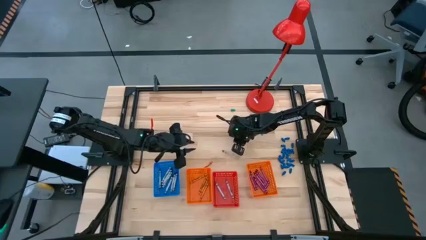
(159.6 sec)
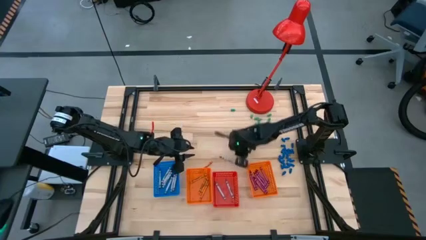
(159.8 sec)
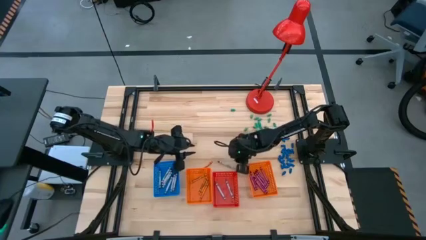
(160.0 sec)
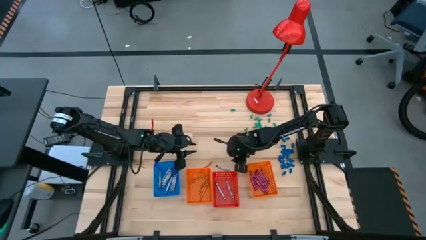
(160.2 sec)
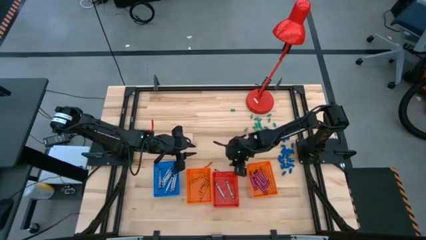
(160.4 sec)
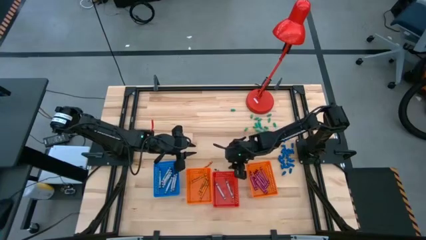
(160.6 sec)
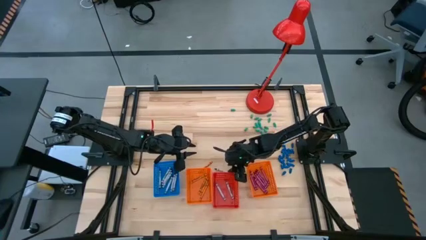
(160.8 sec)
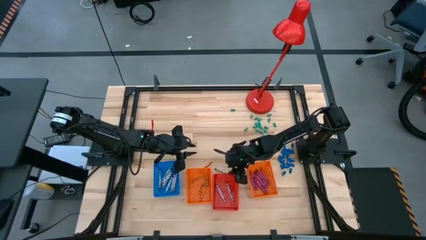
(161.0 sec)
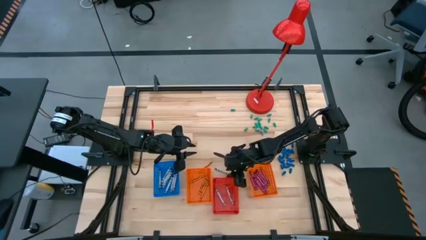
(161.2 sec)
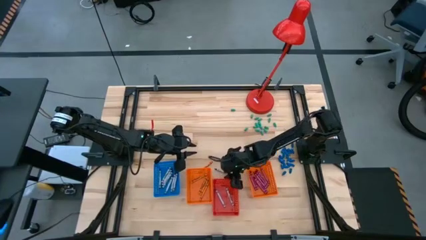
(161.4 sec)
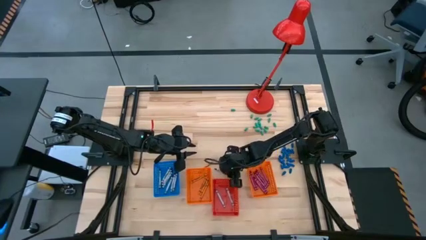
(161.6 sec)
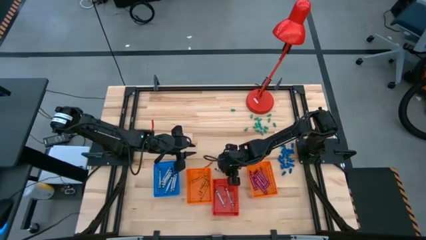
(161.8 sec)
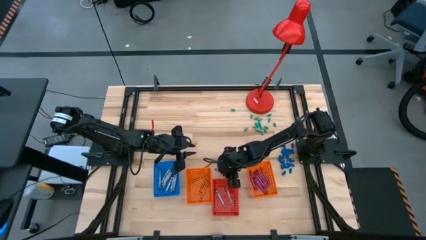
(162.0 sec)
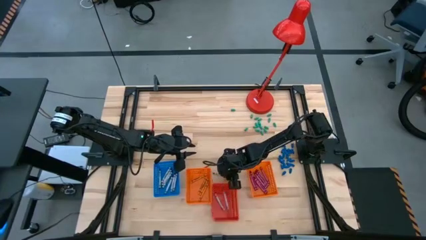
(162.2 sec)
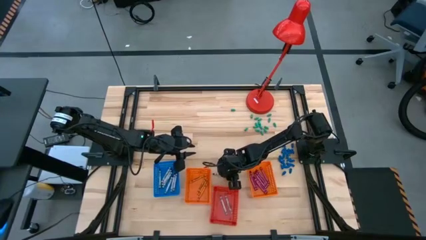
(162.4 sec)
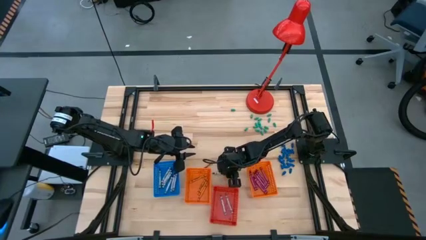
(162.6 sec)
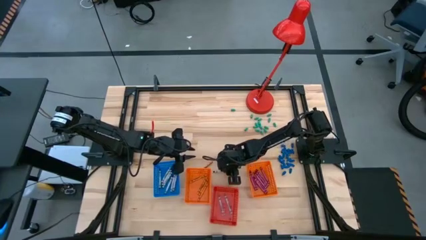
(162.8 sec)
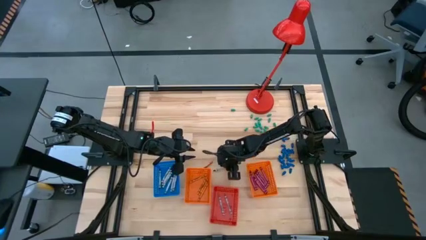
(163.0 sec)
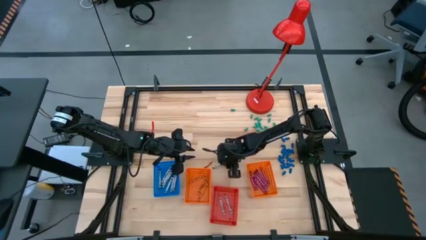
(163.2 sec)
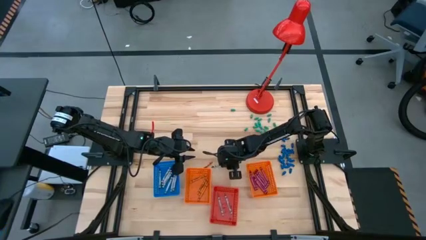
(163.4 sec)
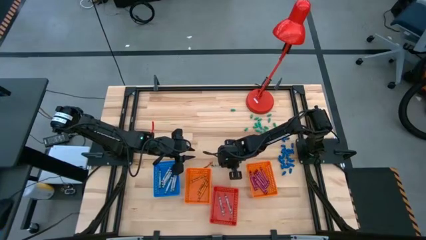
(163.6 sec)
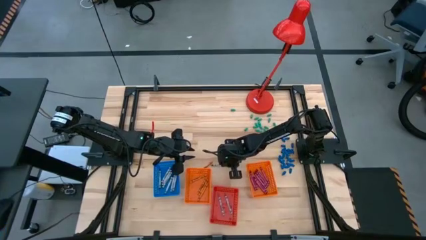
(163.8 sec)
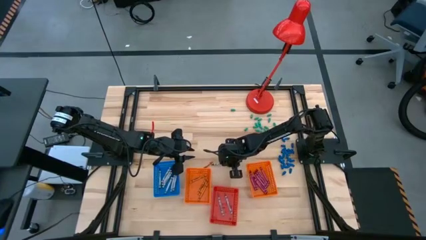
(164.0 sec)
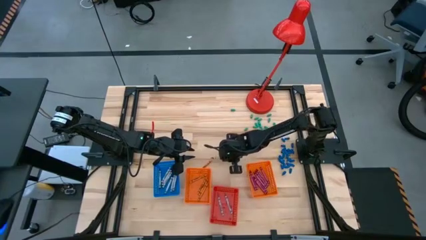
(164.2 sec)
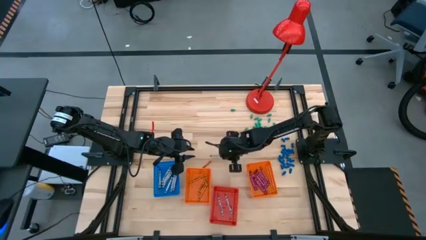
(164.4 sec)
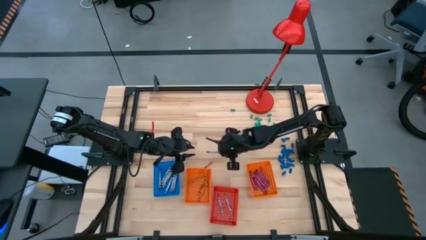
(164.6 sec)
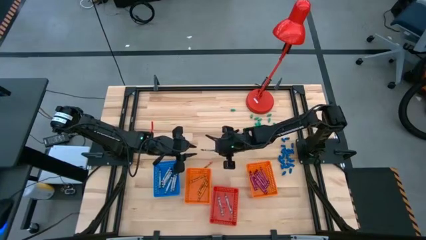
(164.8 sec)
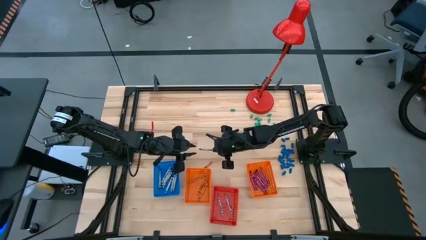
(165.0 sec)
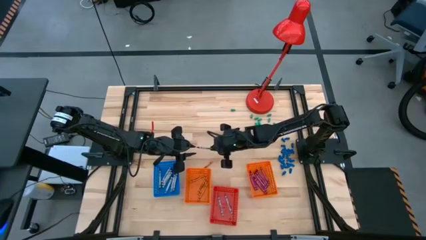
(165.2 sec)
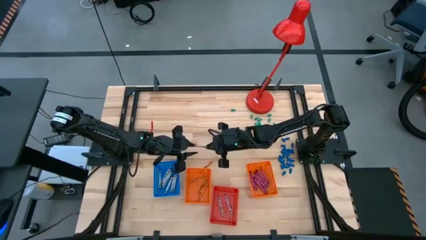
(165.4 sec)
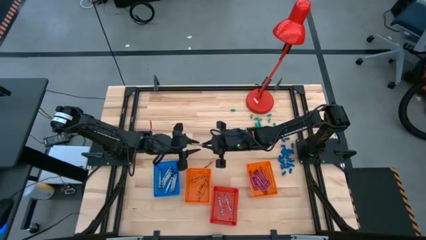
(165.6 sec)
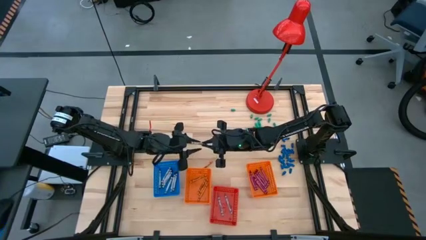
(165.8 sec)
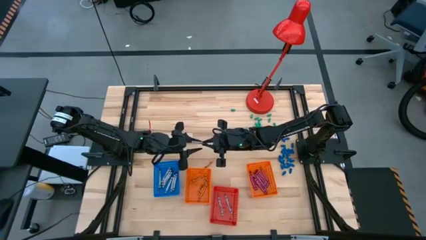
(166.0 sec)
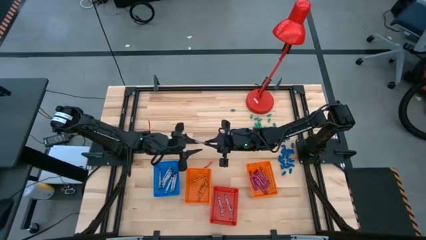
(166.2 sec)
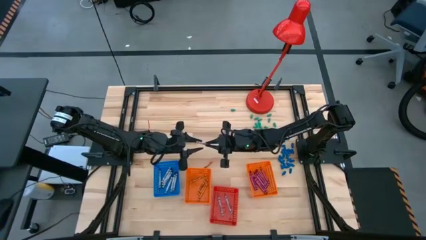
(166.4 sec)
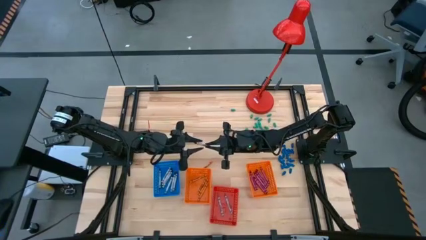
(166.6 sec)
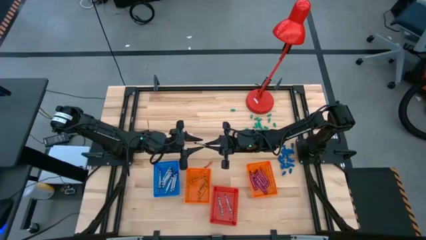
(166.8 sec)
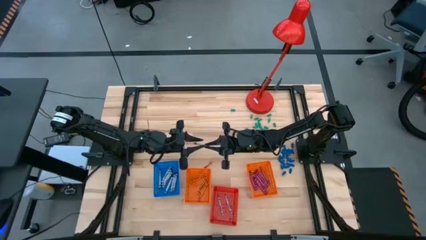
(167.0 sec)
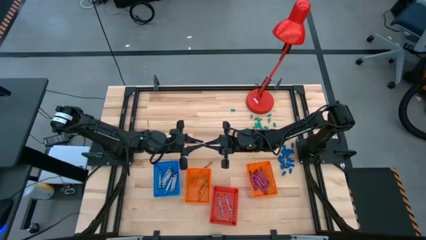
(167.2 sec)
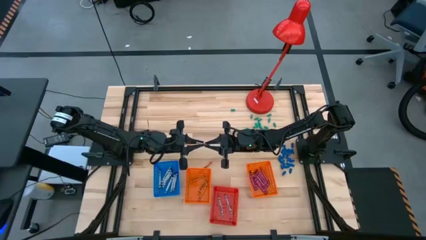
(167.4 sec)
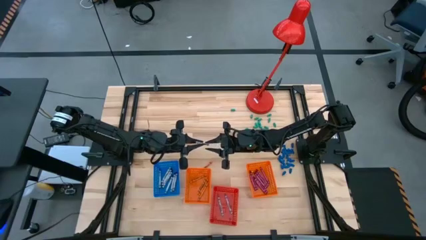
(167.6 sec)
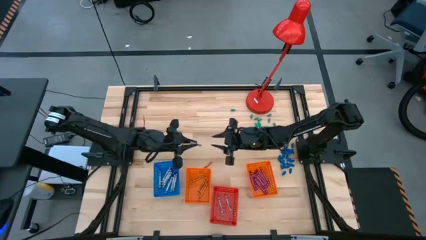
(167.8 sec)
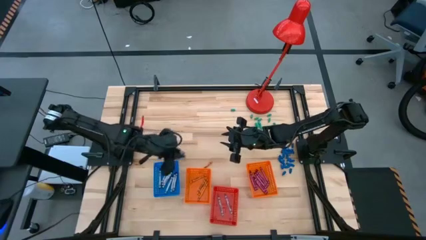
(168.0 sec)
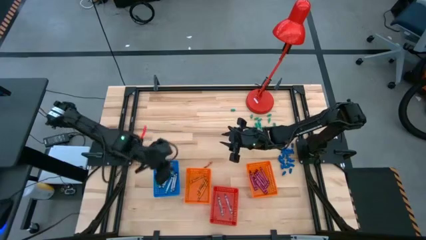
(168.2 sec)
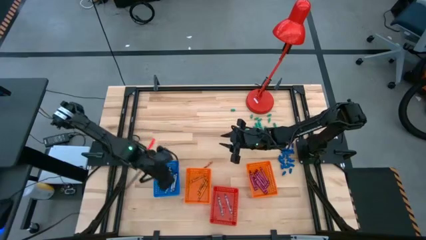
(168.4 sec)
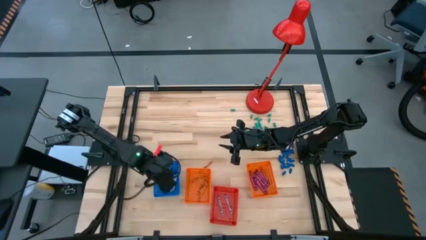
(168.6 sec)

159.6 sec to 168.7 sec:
Task: Sort crayons
Put the black crayon into the blue bin

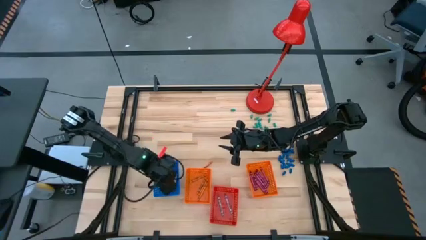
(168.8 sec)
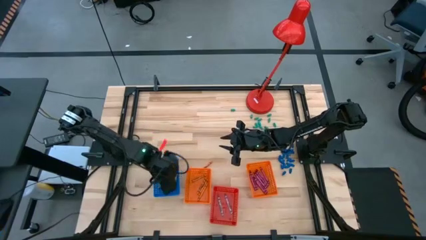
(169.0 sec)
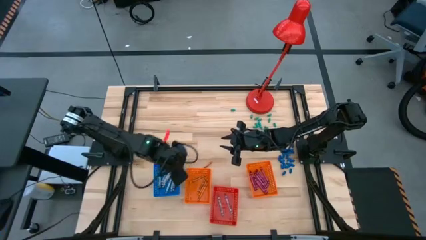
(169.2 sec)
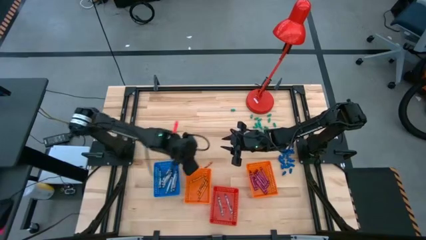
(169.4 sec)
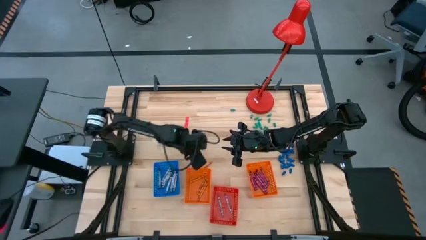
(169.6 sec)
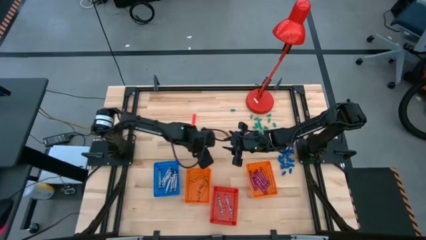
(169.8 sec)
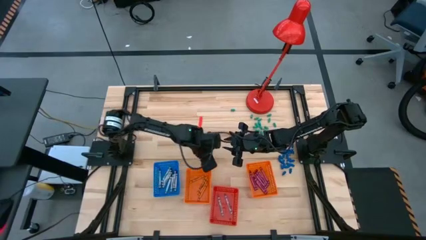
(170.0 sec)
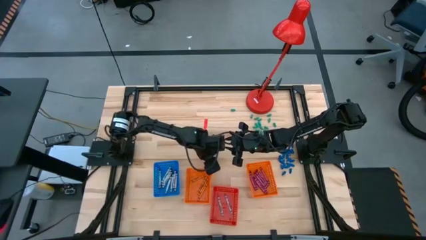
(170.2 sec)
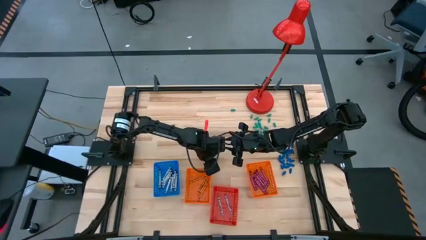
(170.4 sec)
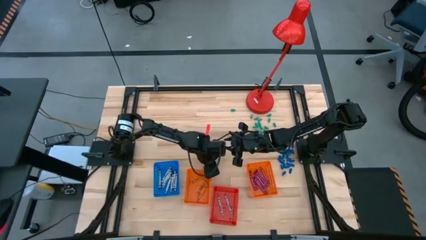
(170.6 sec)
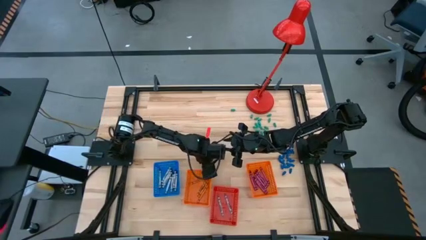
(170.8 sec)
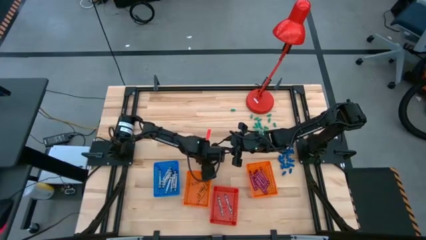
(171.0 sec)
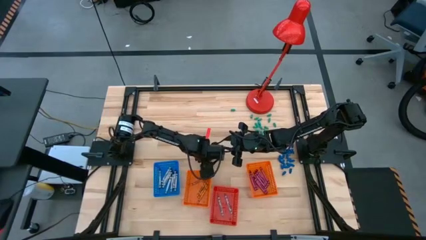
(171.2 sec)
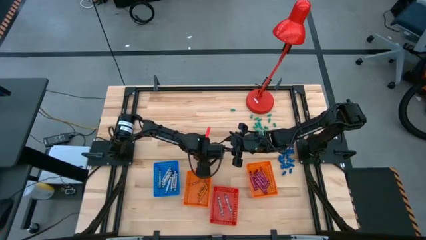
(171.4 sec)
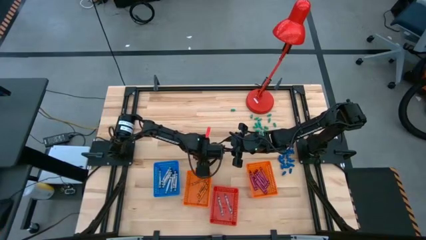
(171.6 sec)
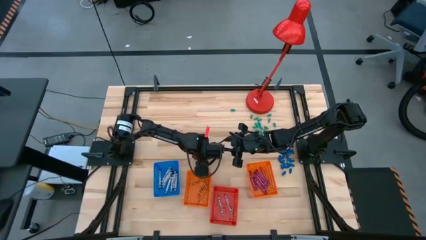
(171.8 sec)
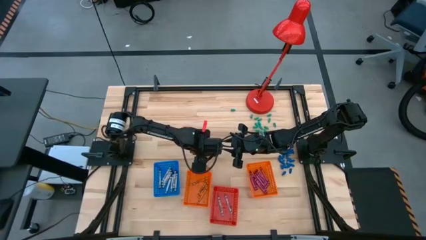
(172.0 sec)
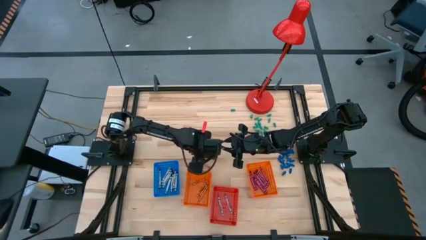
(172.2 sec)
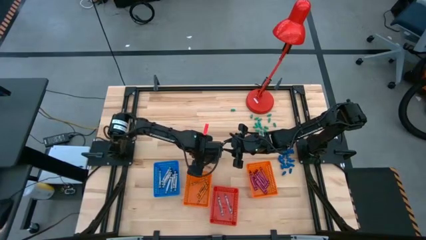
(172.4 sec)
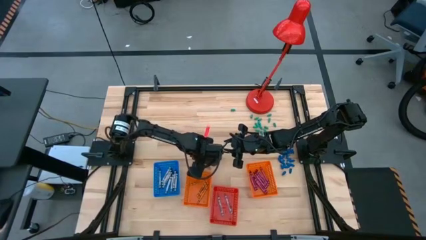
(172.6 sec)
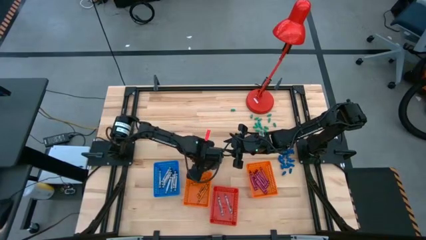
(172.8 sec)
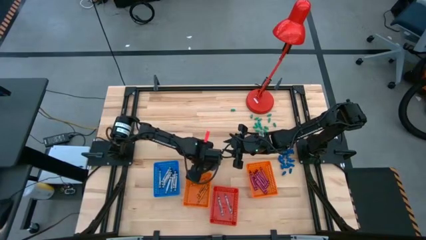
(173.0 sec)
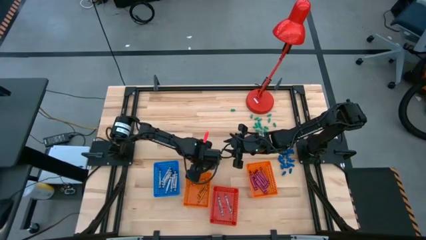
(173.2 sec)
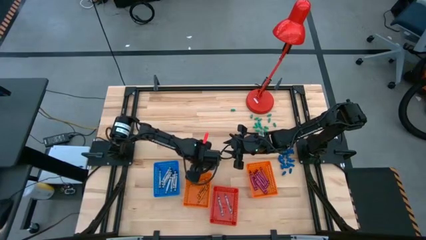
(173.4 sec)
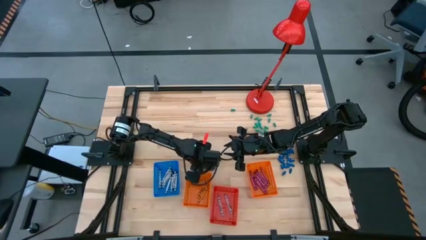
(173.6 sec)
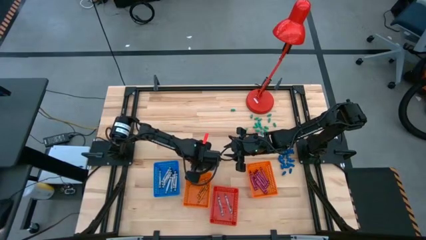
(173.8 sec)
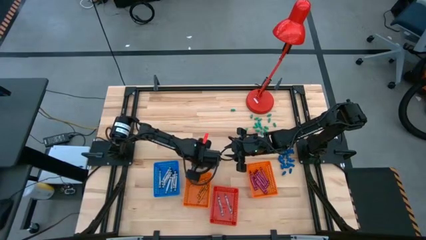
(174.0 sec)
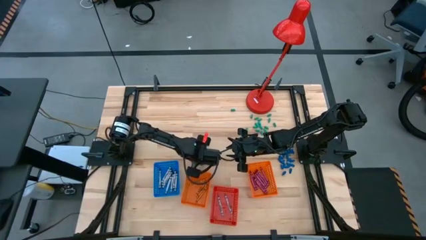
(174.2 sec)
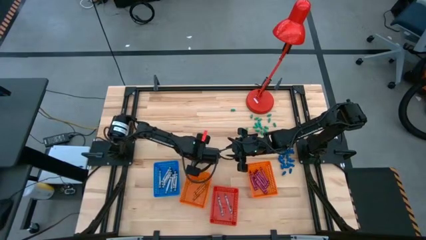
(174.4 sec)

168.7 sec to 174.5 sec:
Put the orange crayon into the left orange bin
